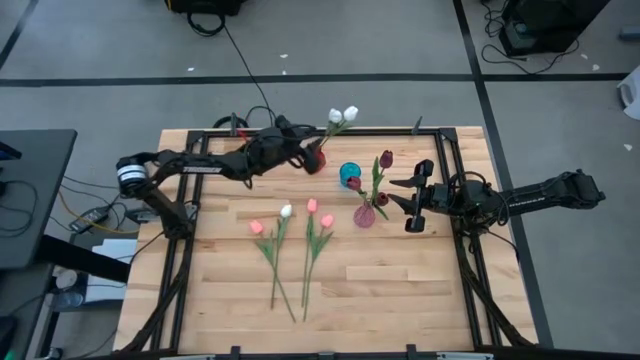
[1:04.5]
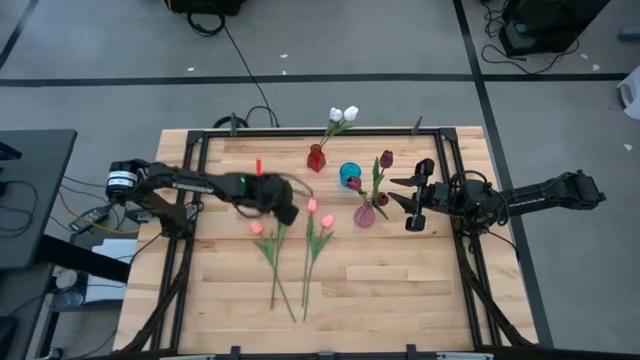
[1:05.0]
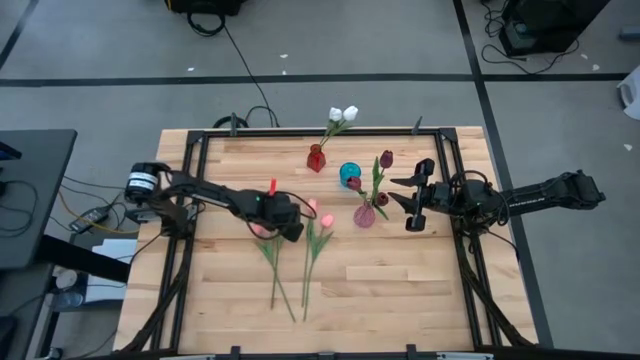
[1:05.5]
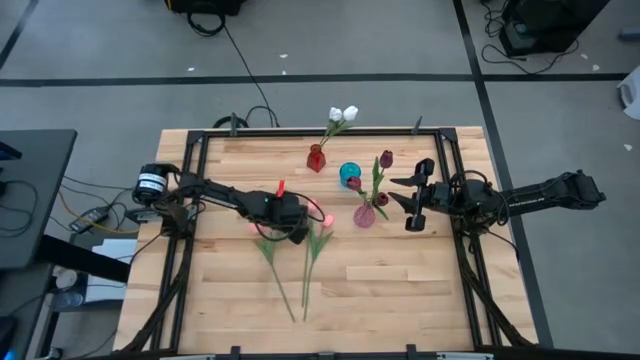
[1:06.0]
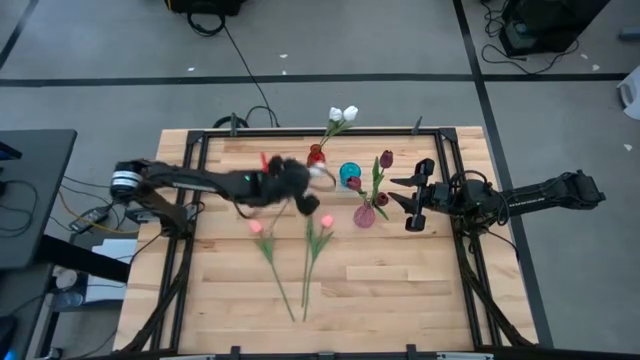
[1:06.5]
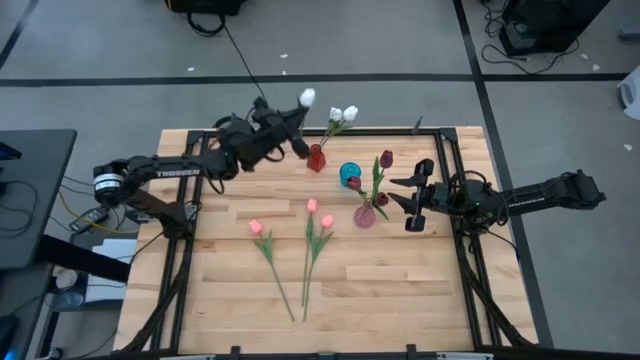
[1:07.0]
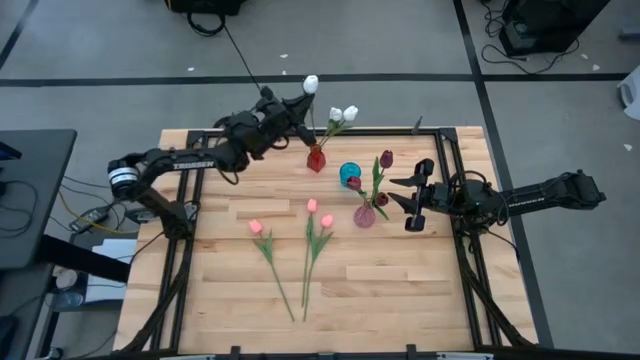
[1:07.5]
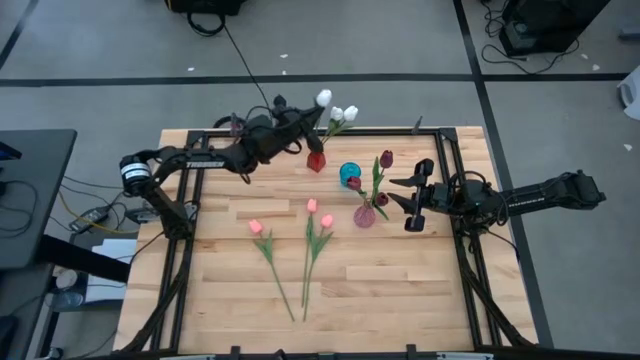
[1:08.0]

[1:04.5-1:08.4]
Task: Sort flowers into vase by color
Put the white tulip into the red vase

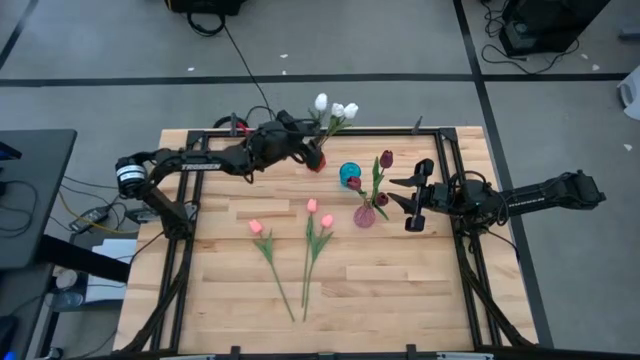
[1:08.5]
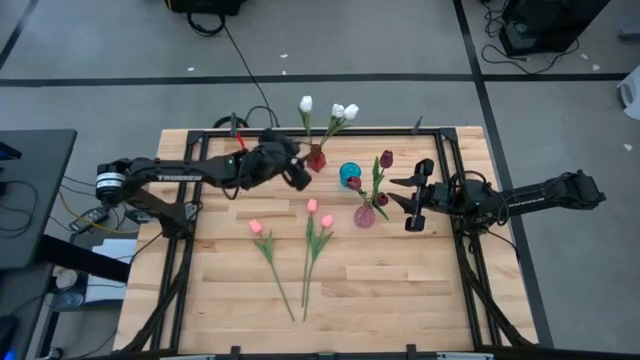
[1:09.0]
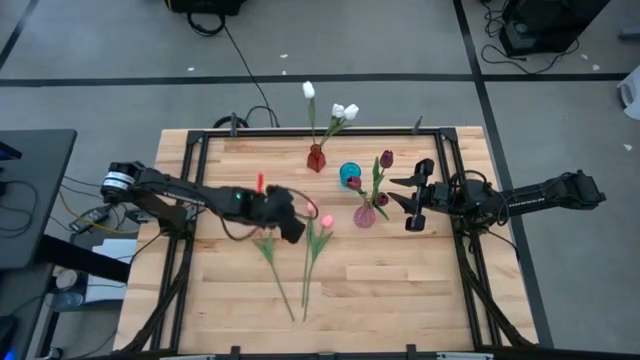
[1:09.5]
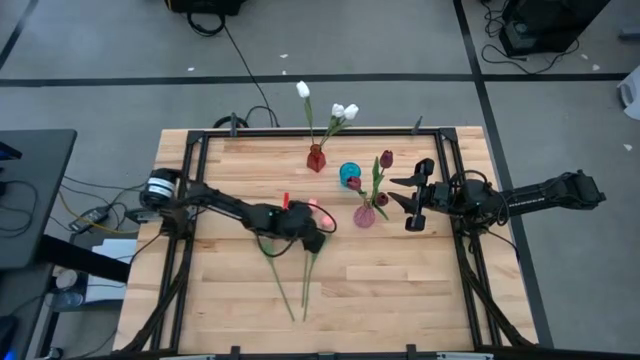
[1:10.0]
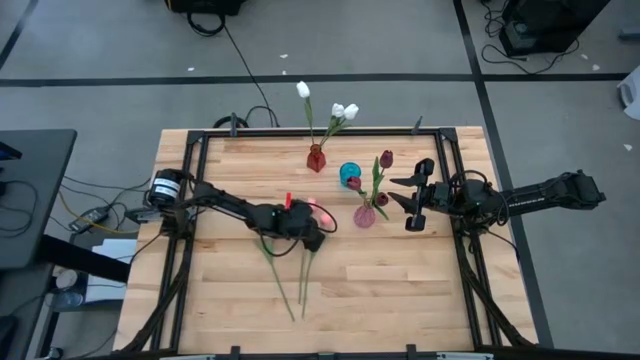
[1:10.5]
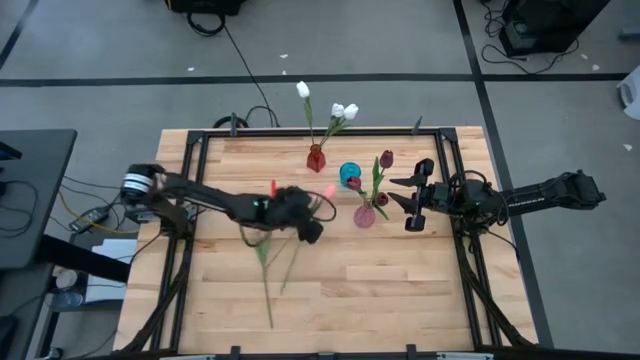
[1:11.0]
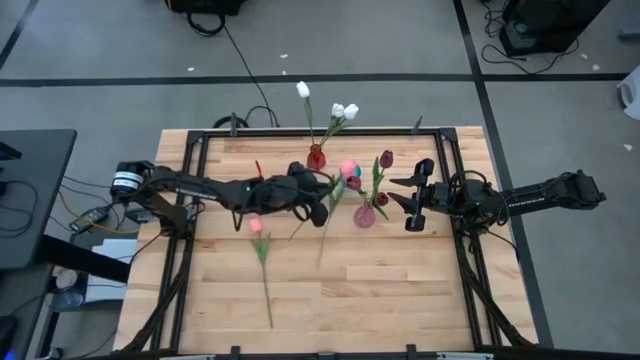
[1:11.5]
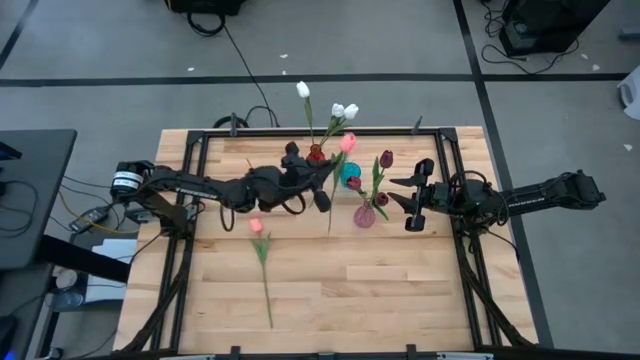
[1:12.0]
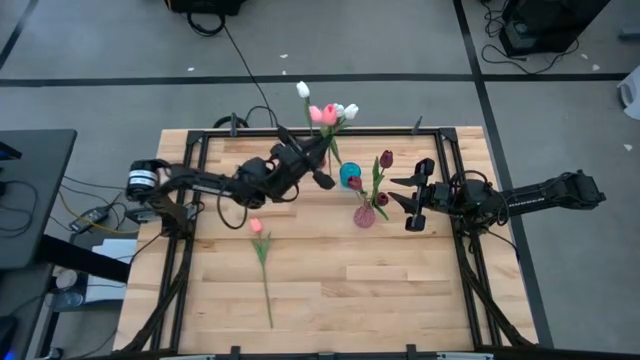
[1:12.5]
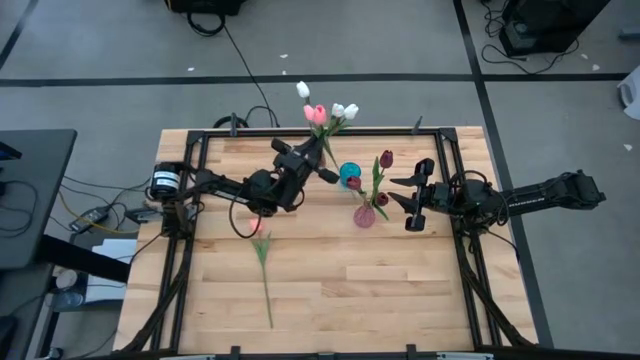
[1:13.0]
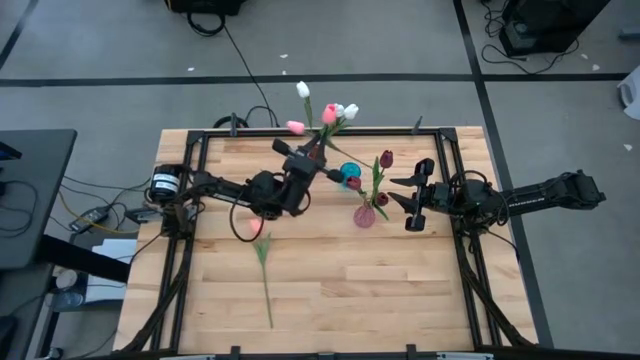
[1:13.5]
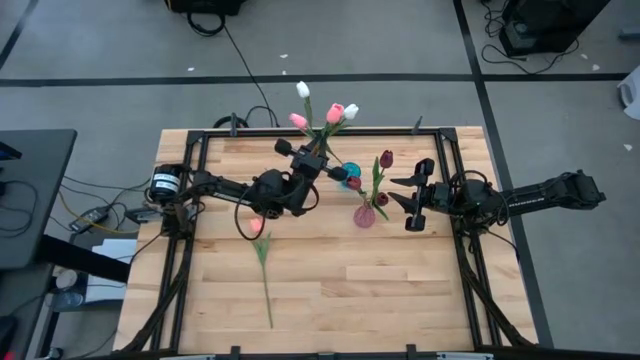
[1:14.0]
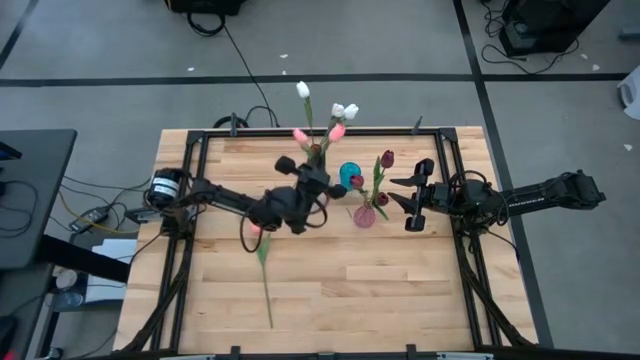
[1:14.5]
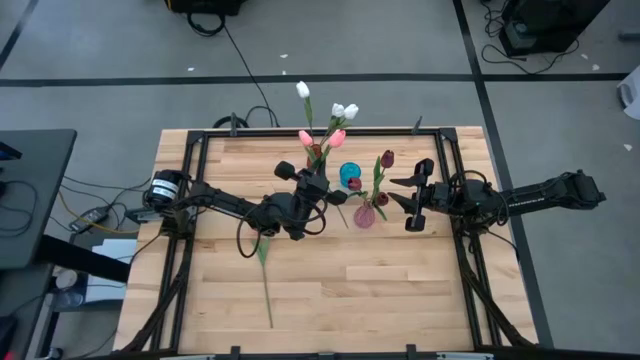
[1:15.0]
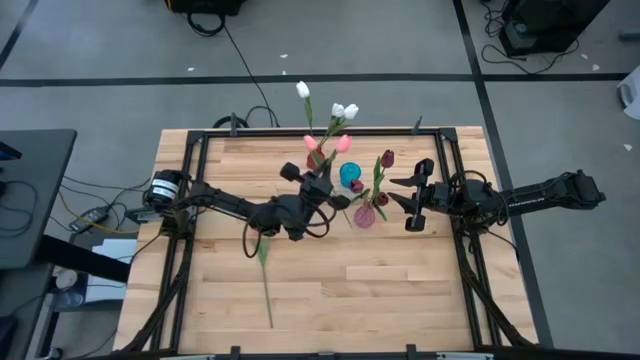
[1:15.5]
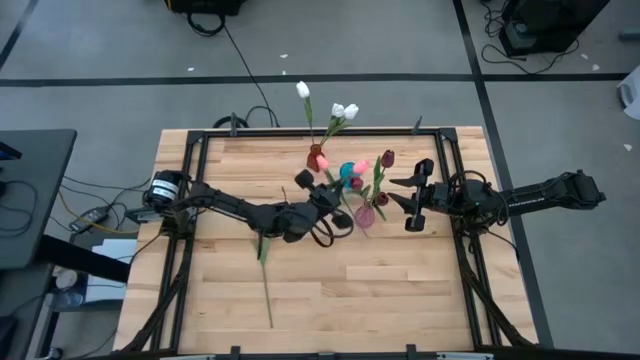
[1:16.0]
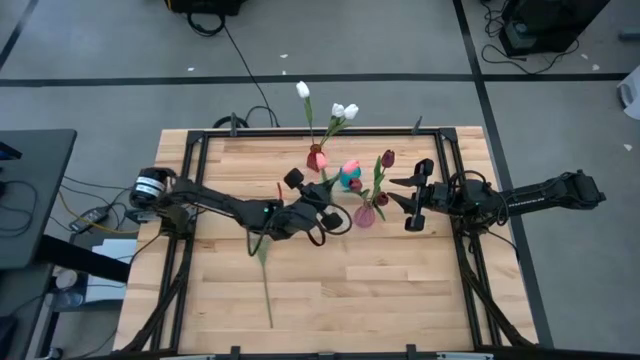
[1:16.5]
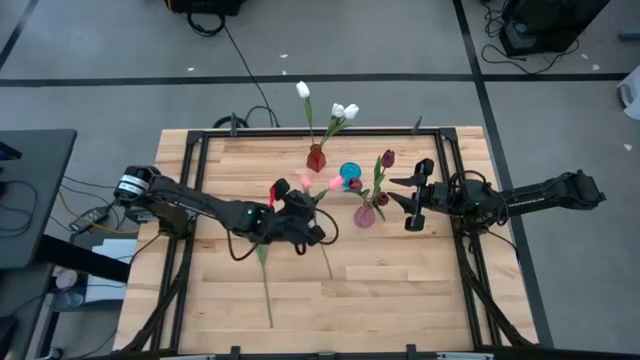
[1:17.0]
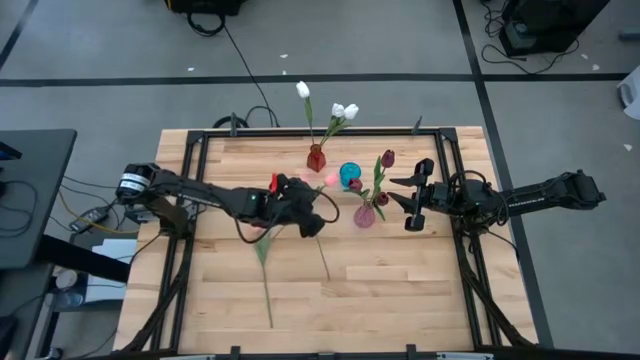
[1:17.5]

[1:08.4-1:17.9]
Put the center pink tulip into the blue vase

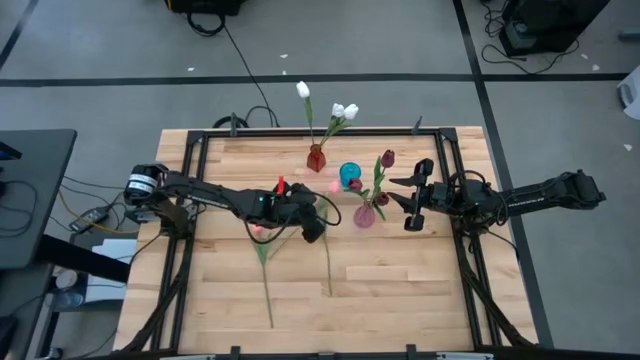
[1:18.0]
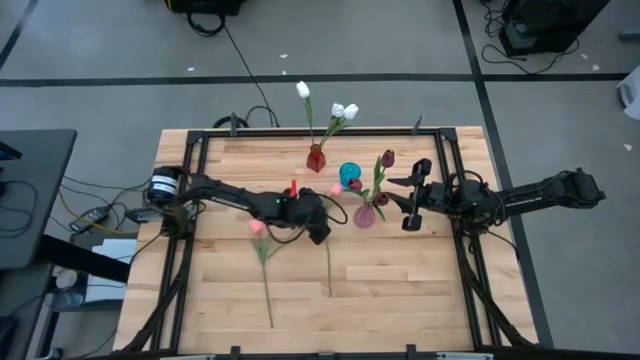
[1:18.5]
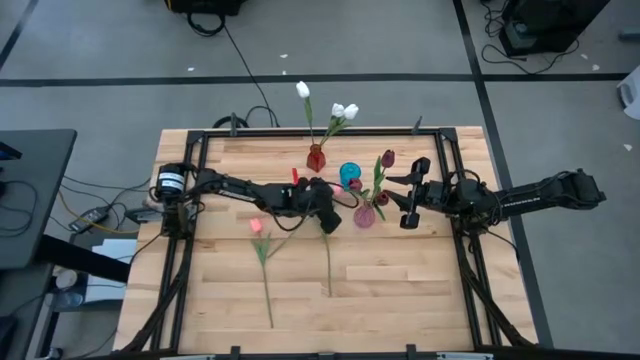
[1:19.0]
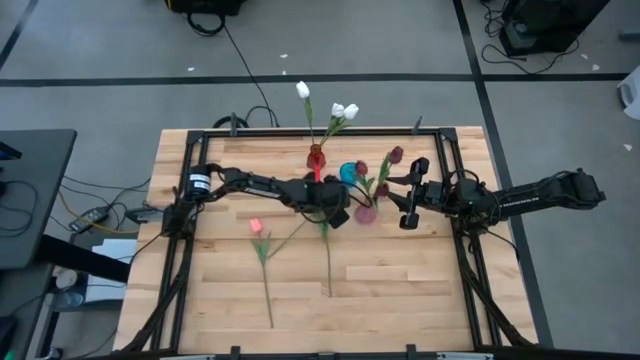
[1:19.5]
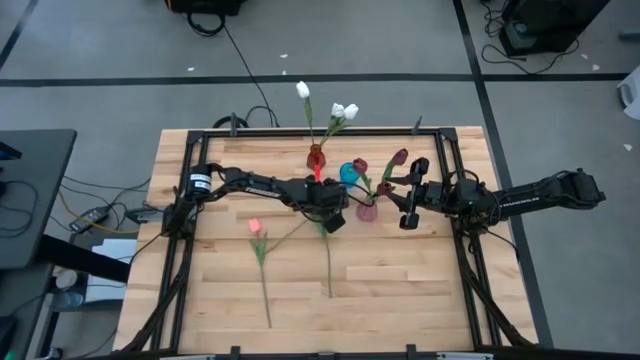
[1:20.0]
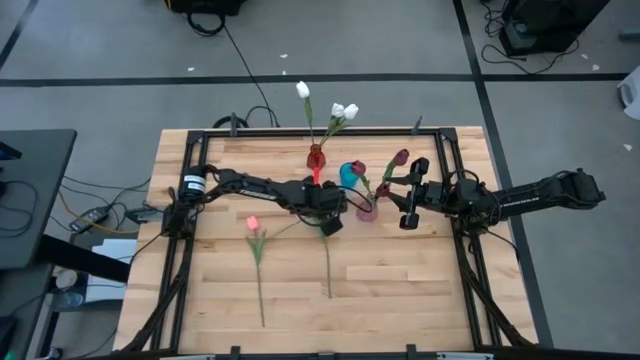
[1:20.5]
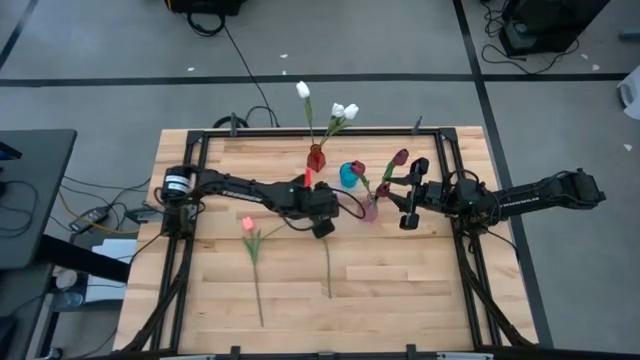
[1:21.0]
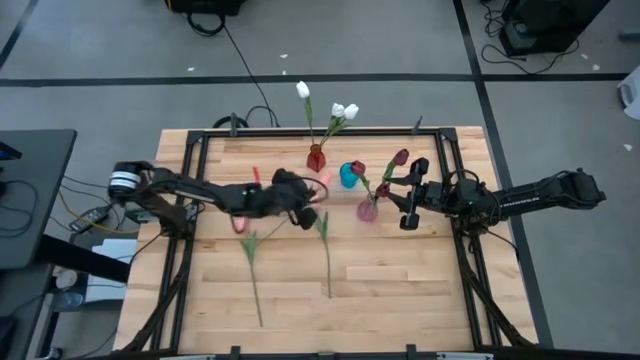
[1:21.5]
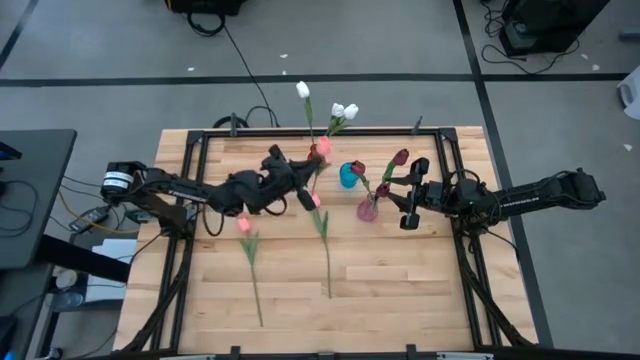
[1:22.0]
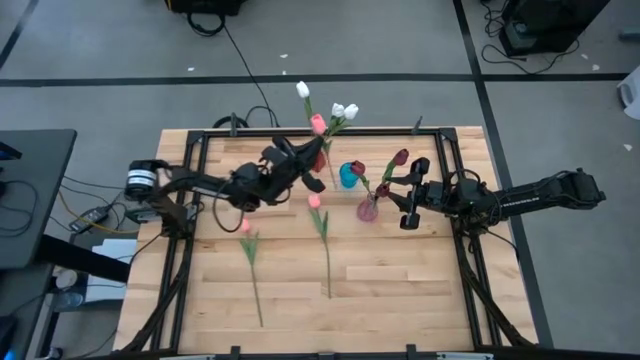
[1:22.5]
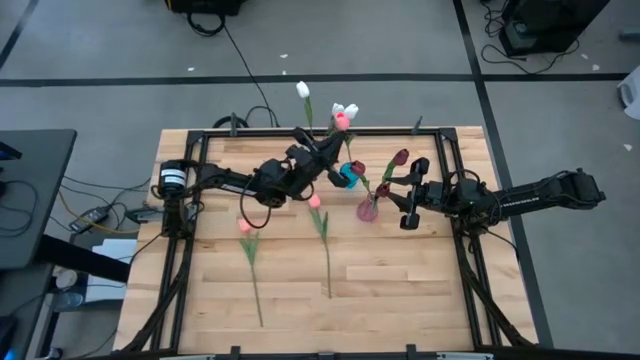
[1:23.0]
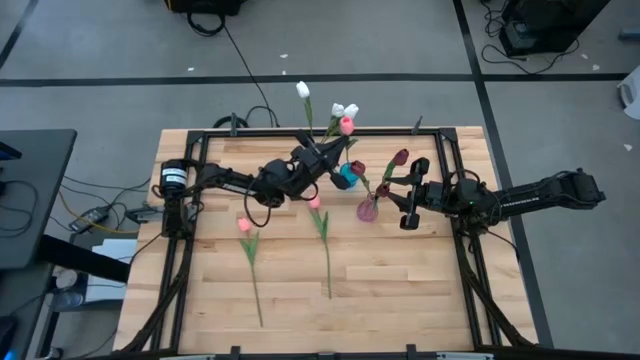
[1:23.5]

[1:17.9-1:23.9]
Put the center pink tulip into the blue vase

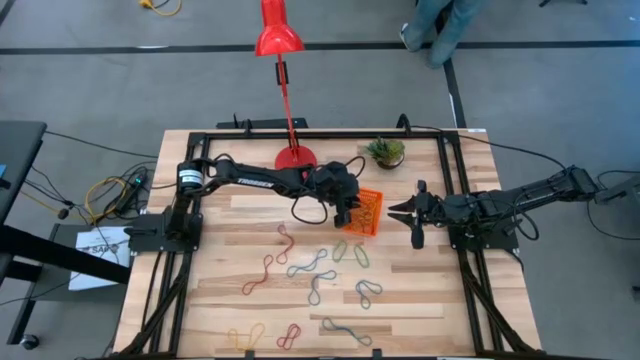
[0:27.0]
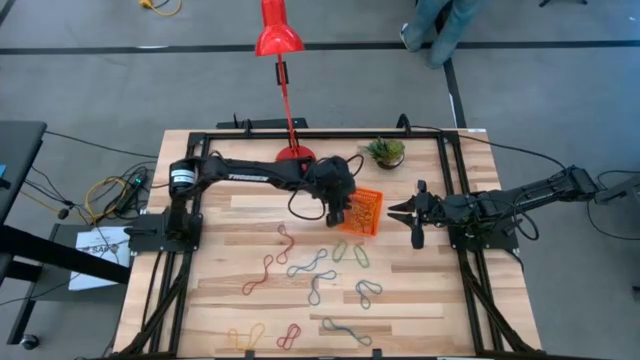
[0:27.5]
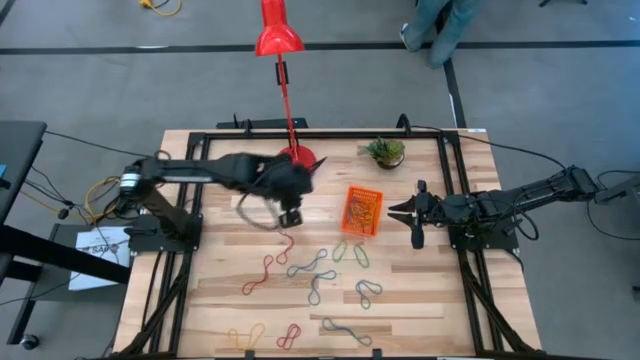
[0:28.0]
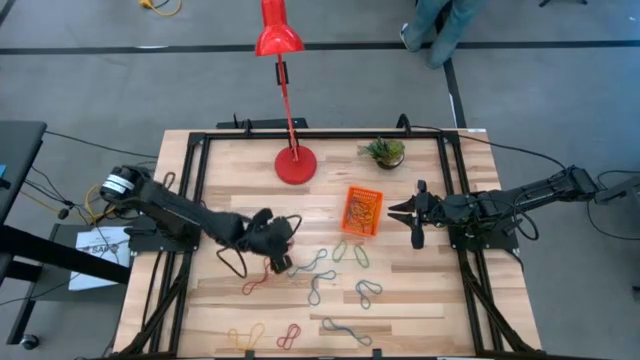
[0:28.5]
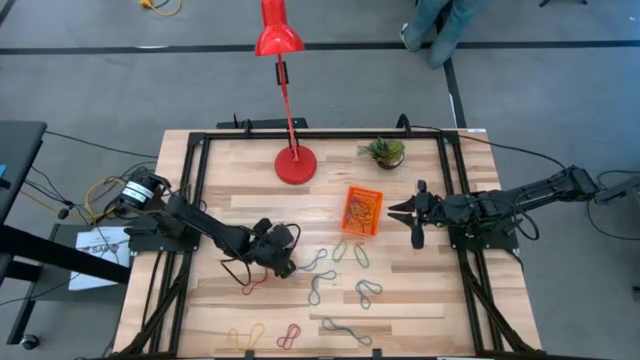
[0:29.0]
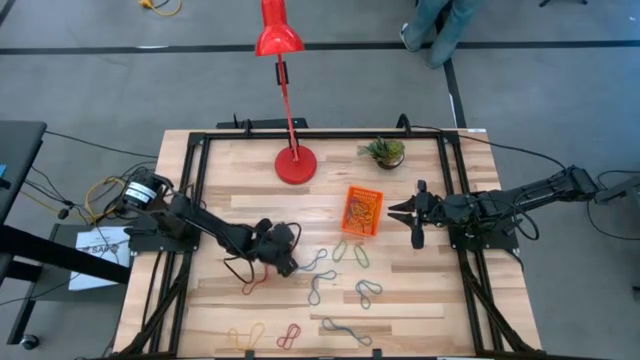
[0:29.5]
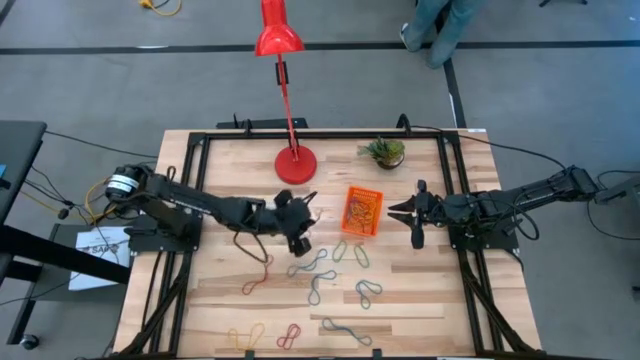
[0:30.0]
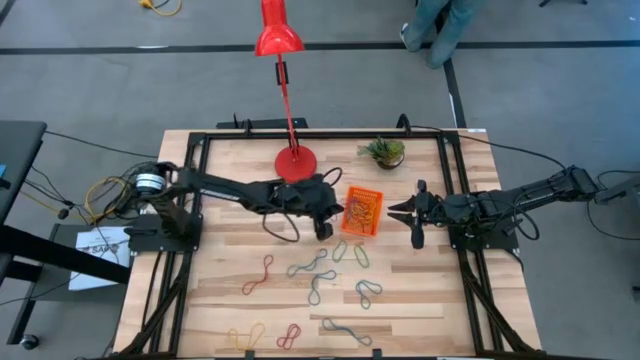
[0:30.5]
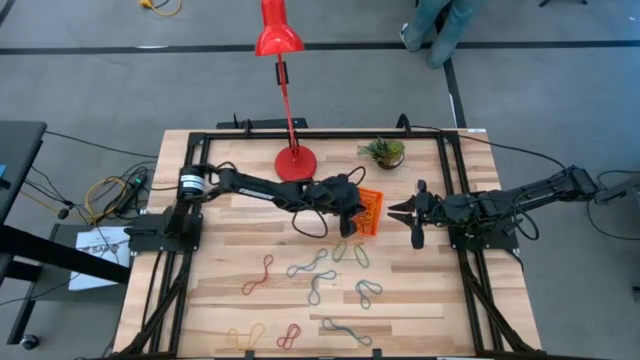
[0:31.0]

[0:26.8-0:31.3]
Task: Pick and place items into bin
Put the top red rubberband into the orange basket
